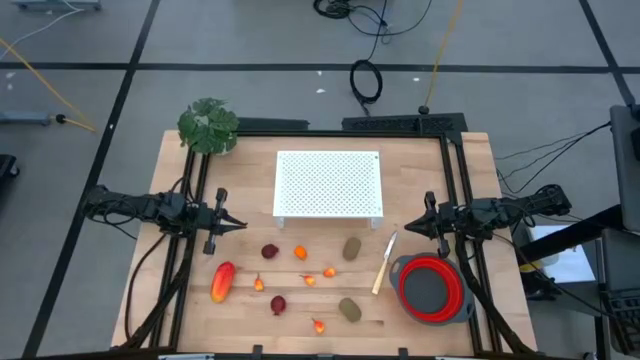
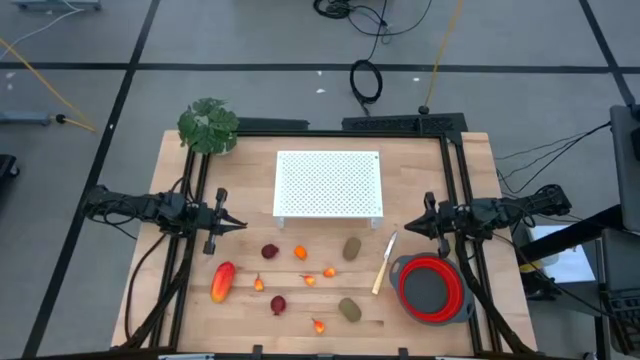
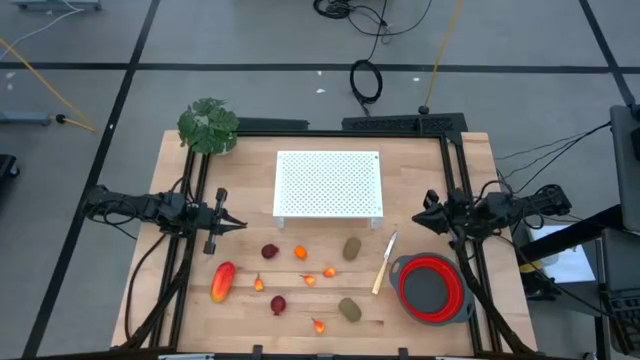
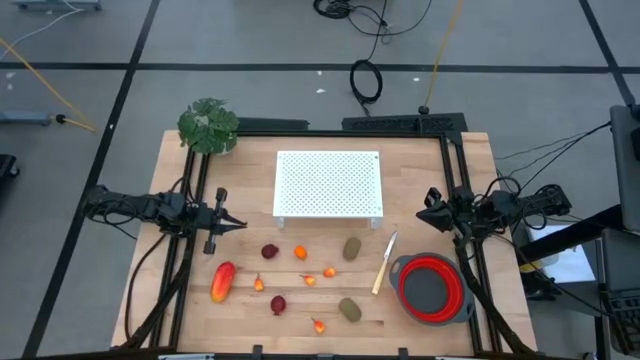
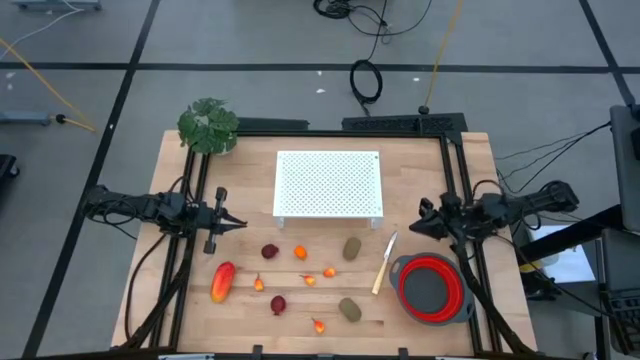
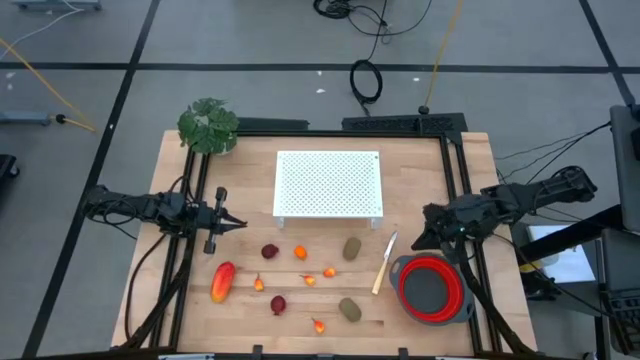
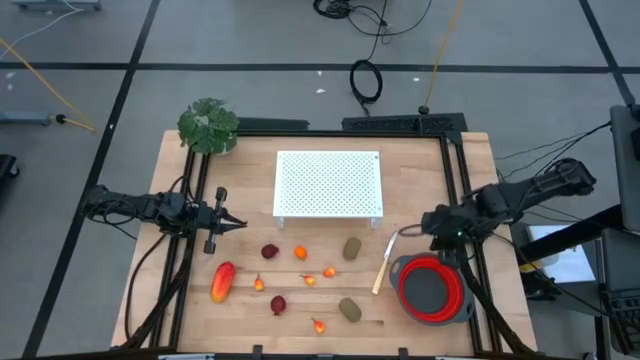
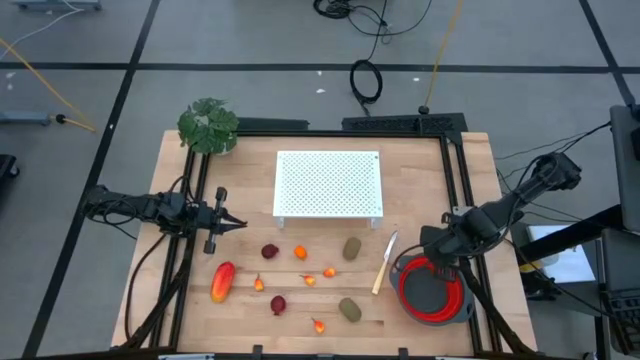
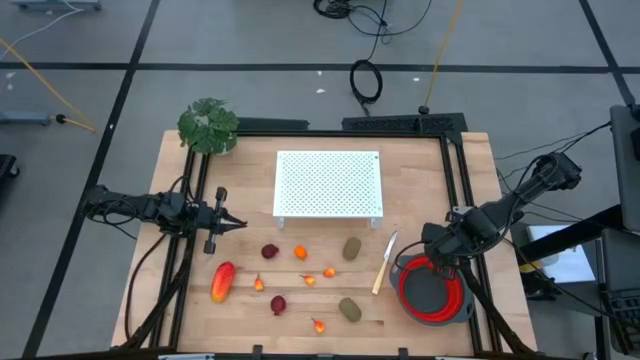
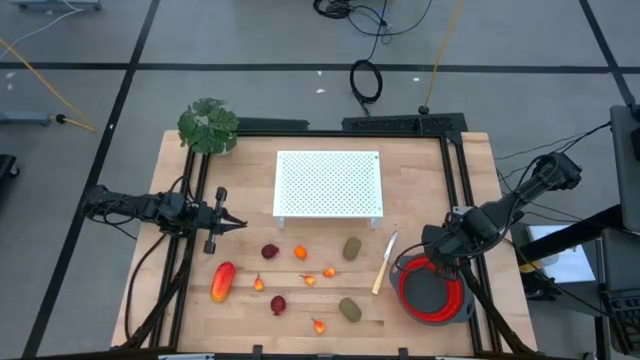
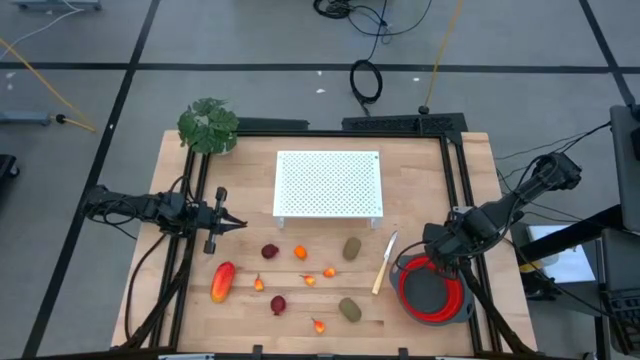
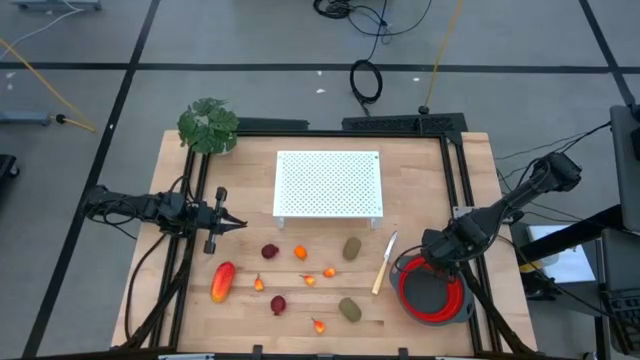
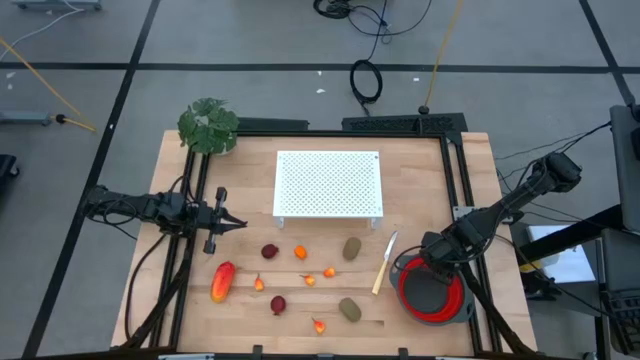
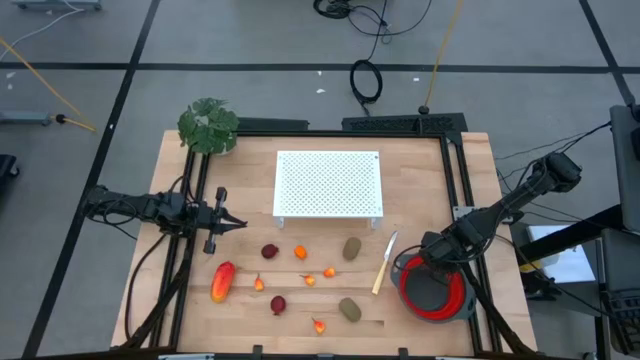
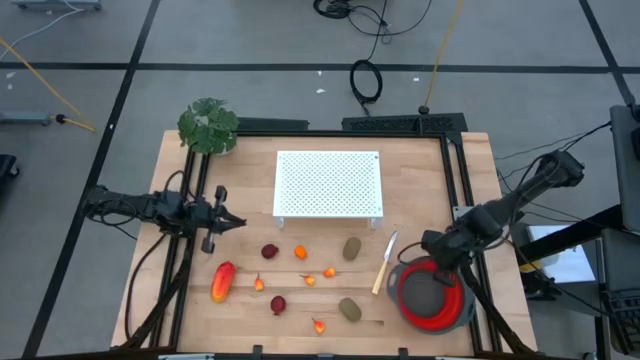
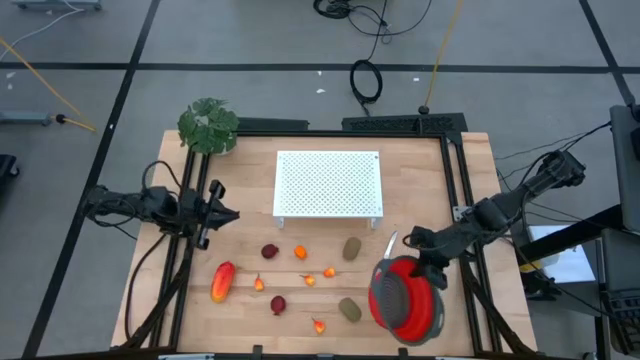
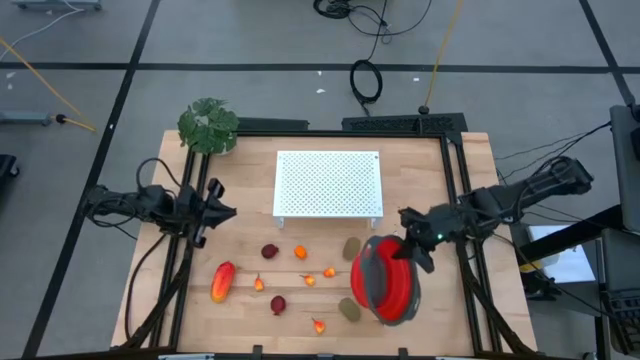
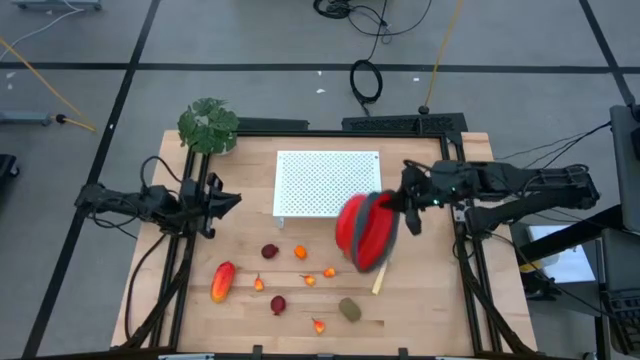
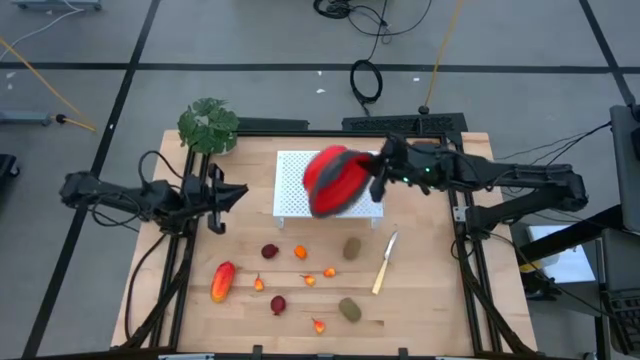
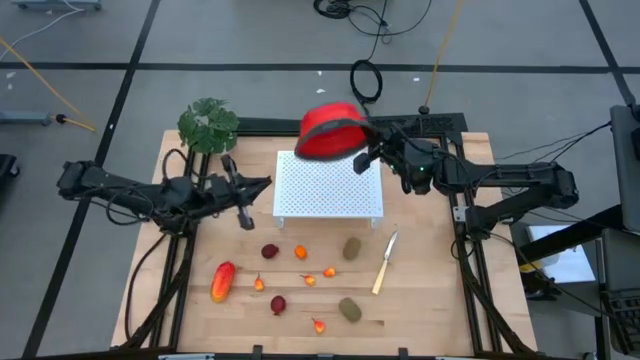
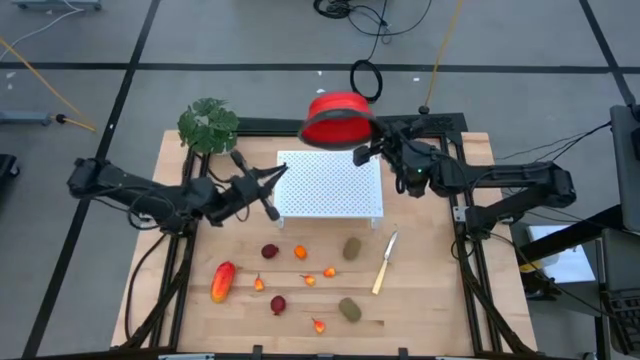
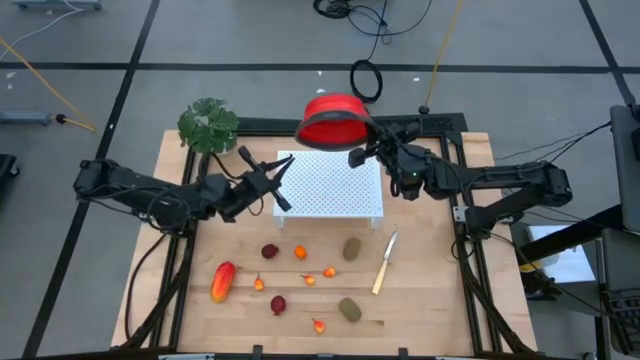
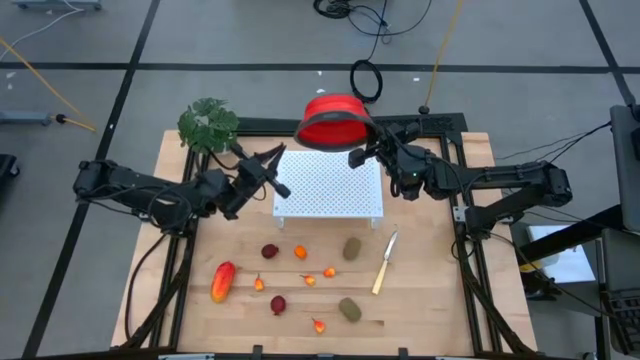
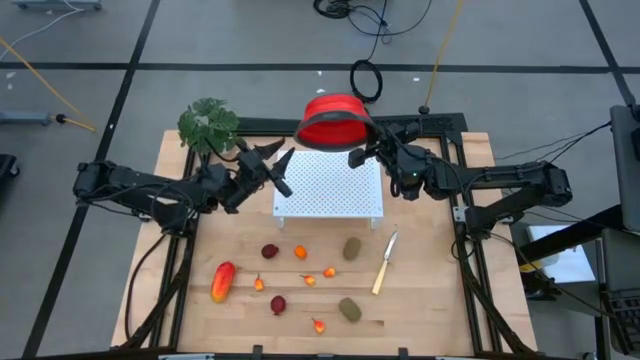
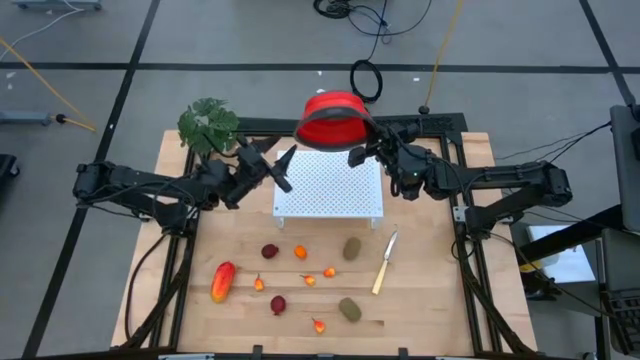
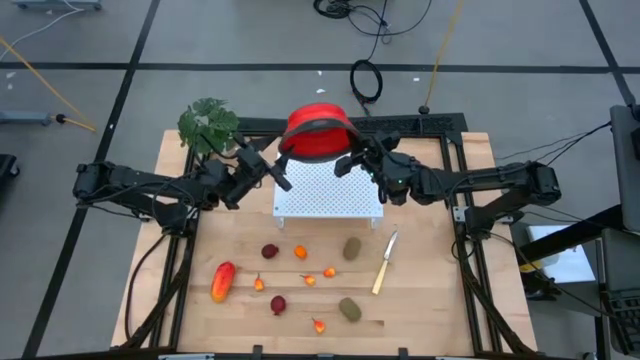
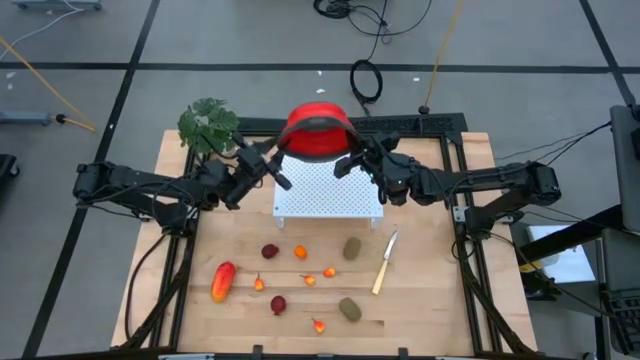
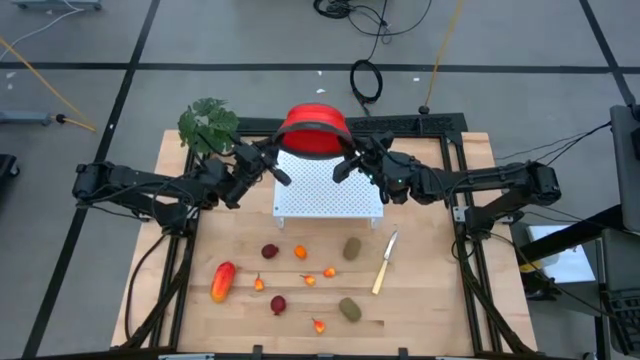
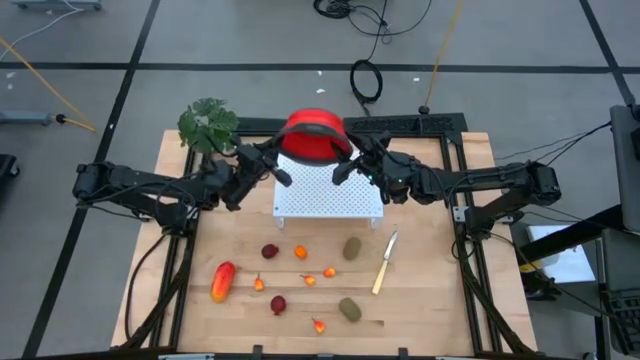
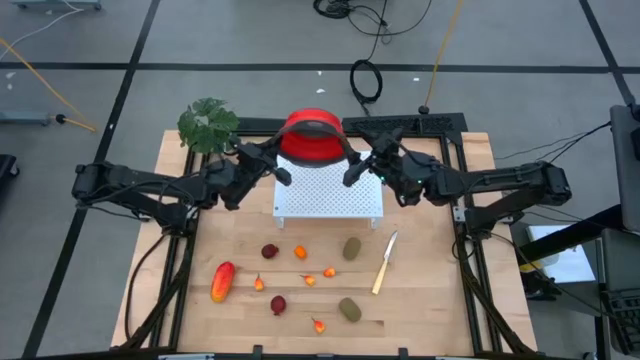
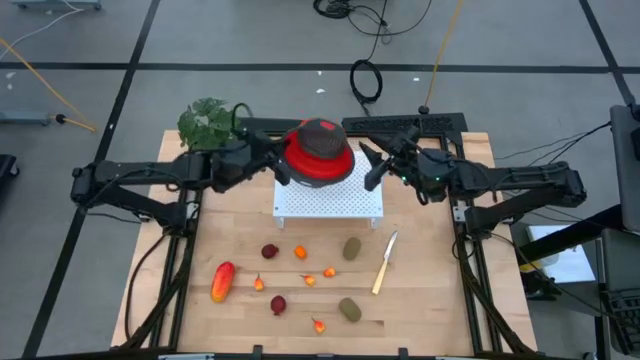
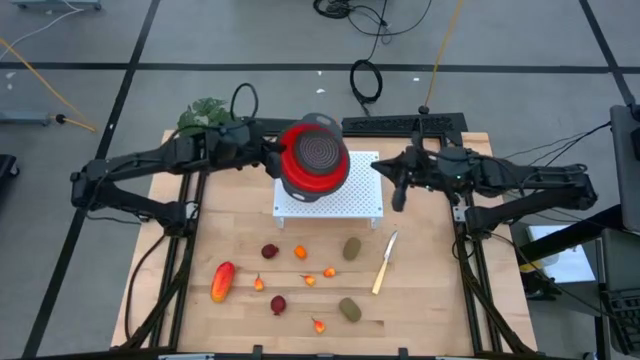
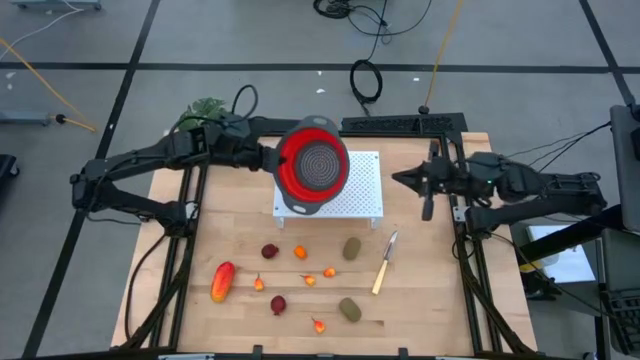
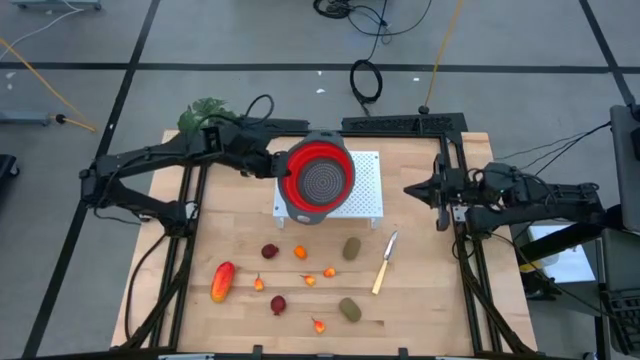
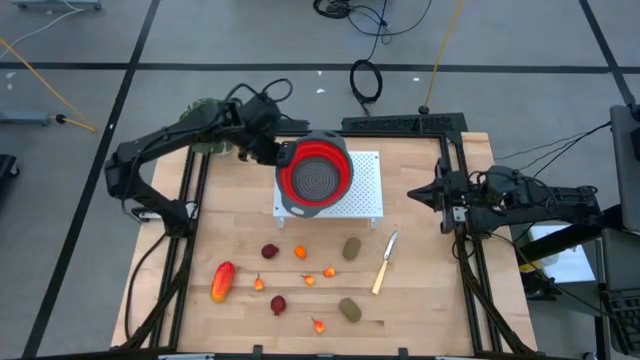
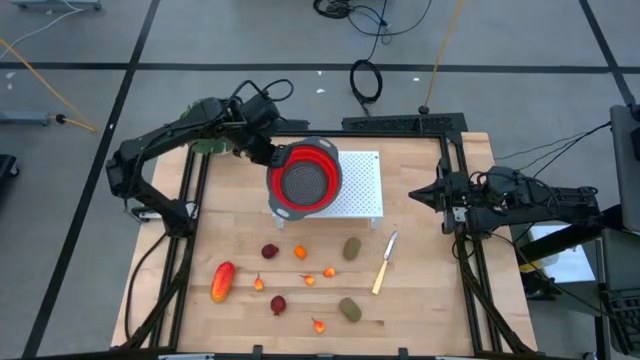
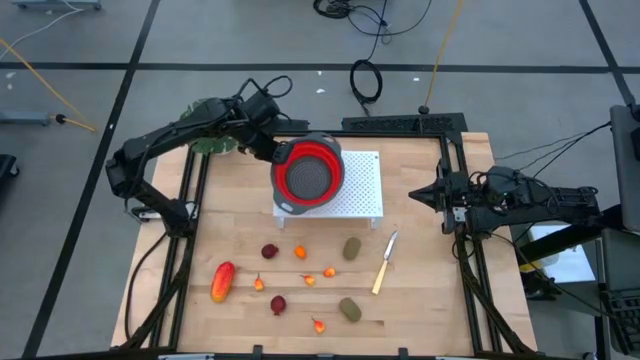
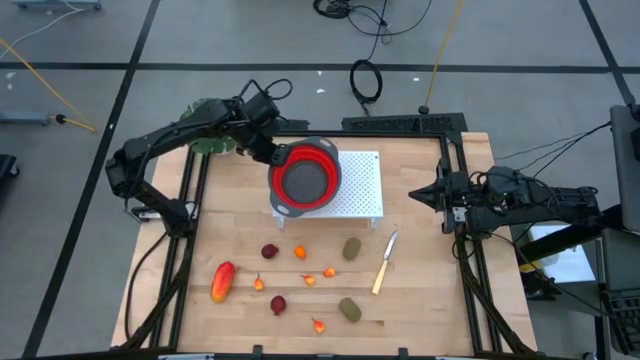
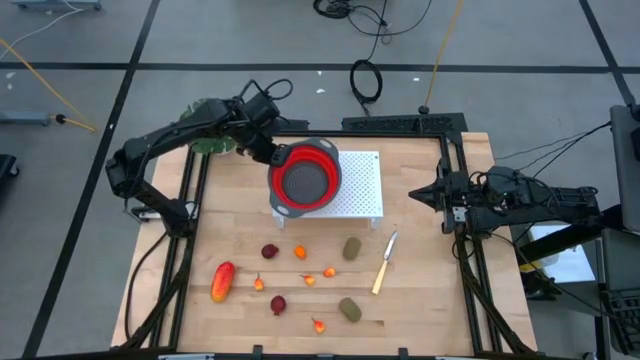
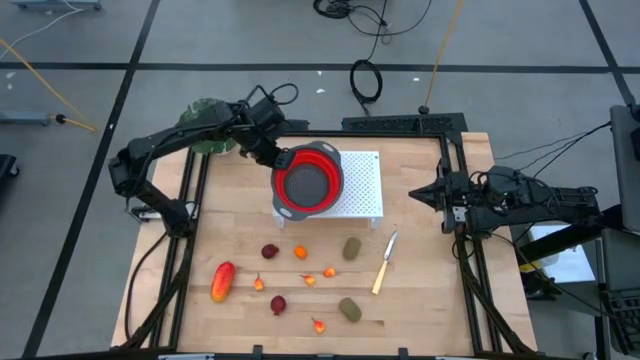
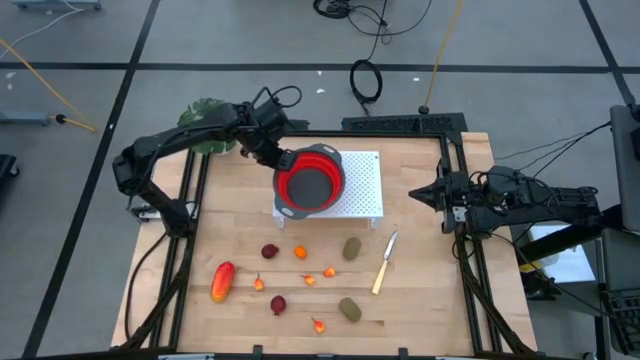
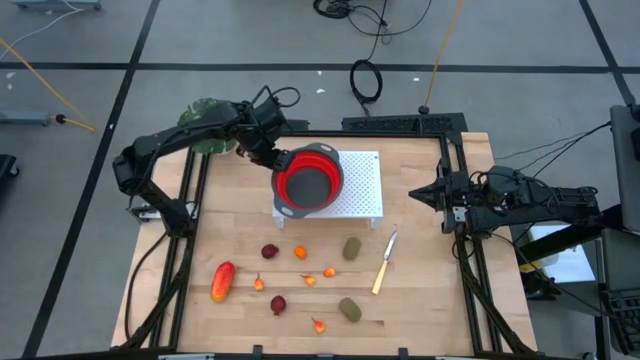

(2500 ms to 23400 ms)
Task: Pick & Place Fruit
Put the orange strainer bowl on the shelf
